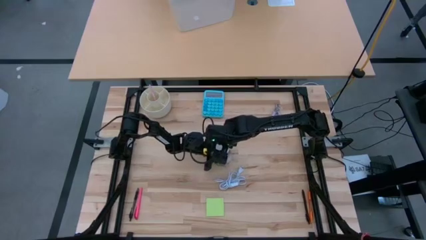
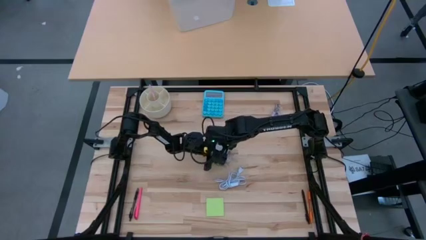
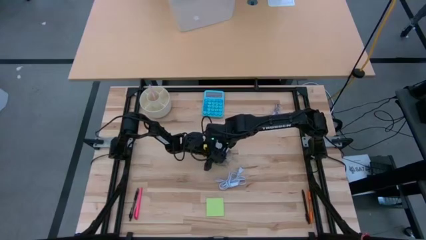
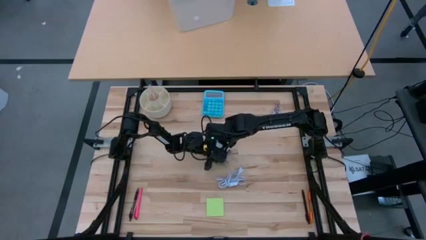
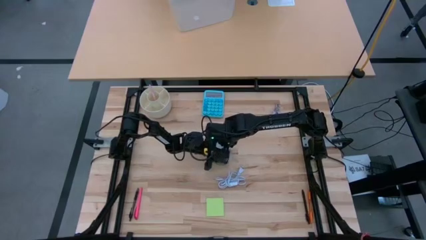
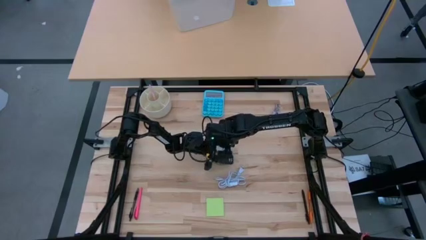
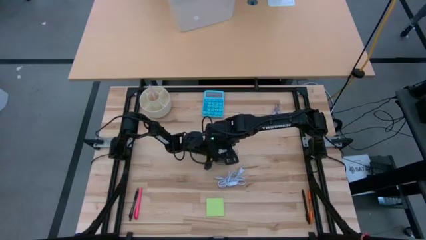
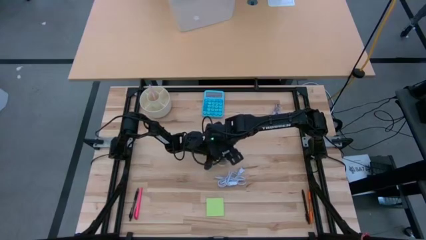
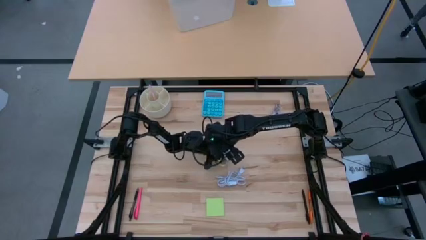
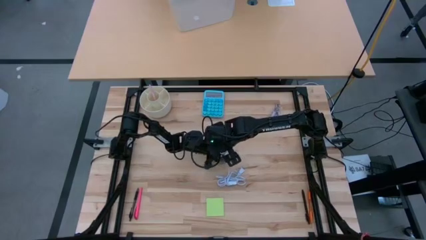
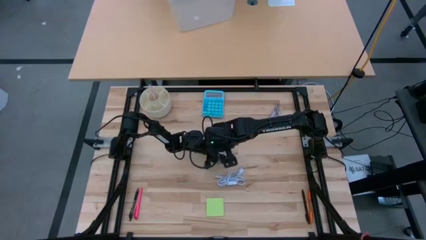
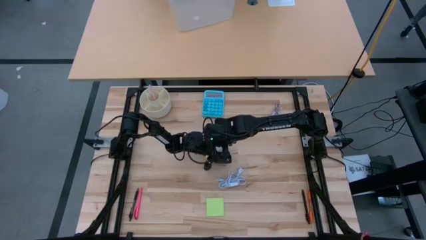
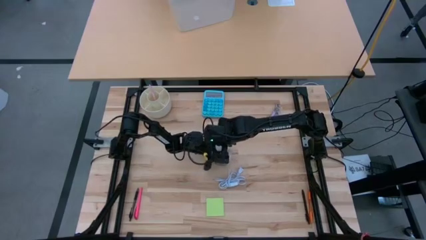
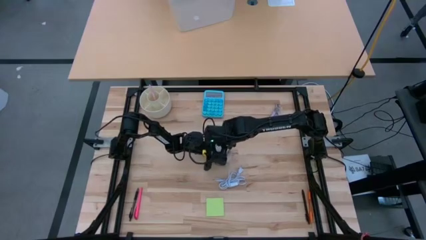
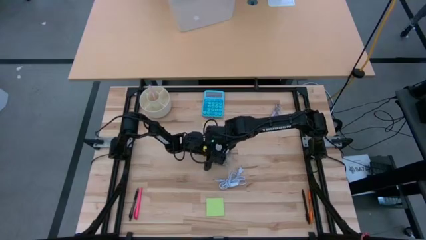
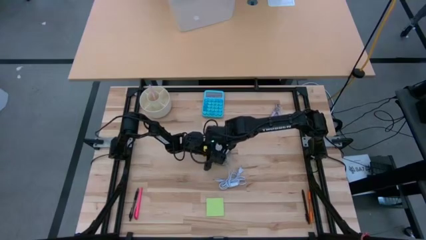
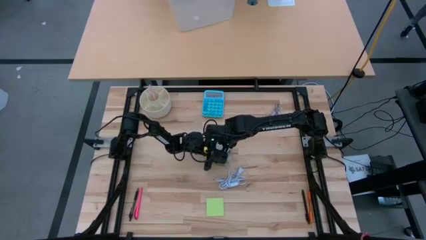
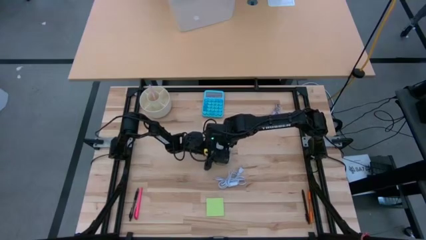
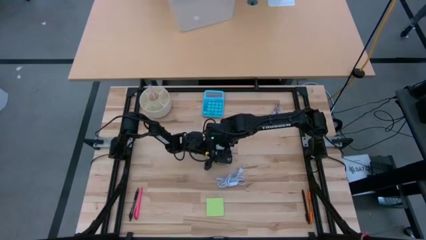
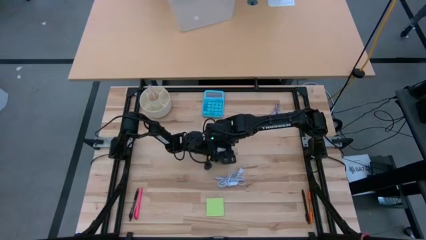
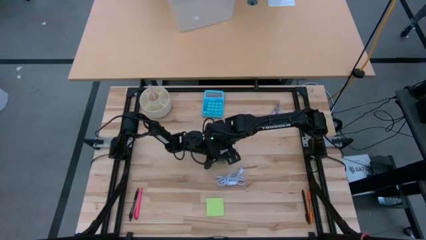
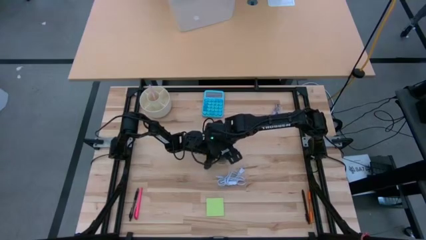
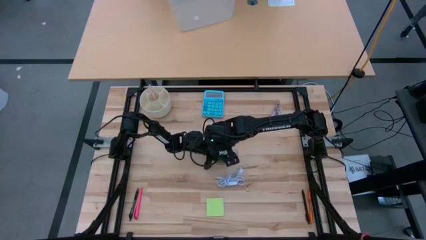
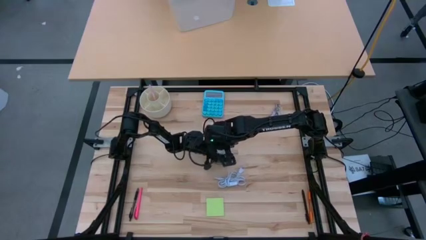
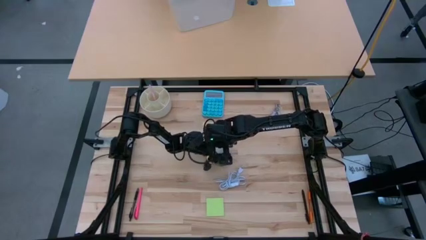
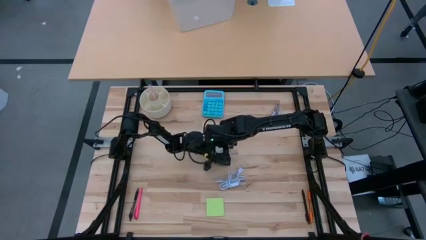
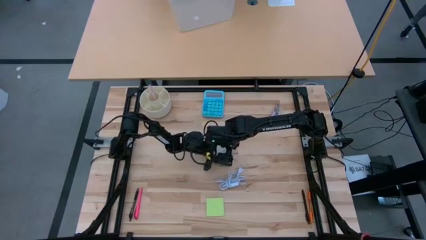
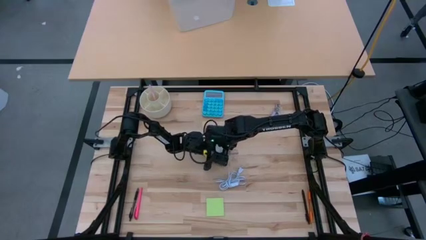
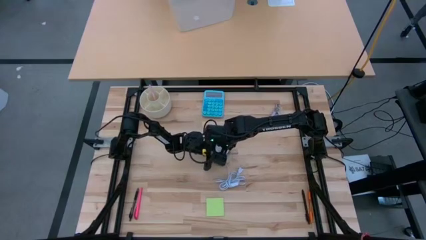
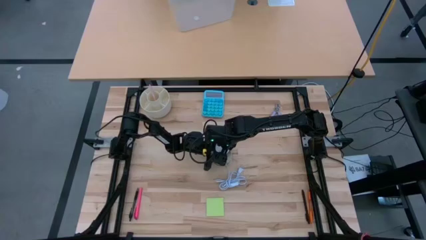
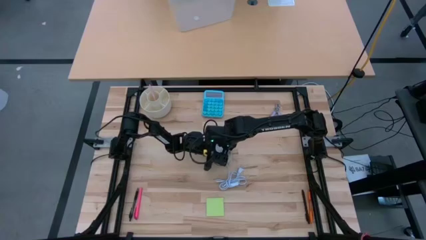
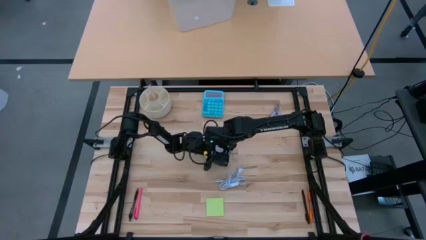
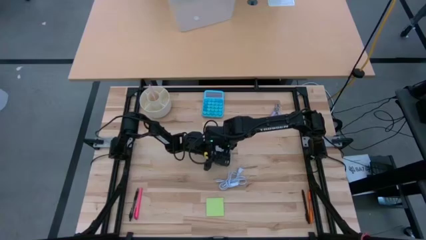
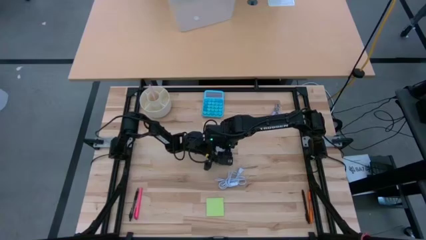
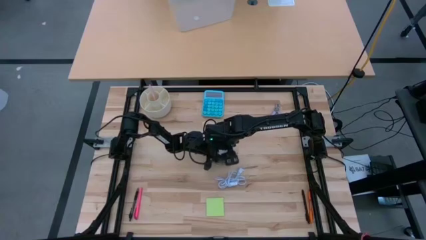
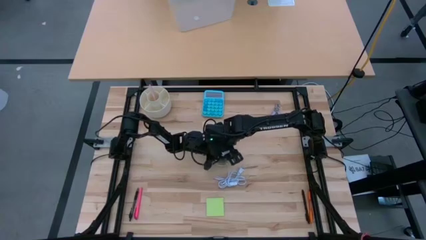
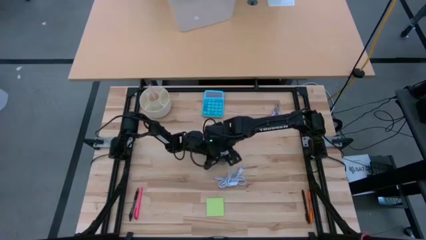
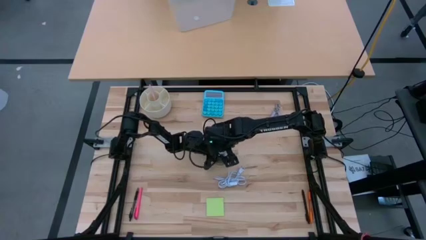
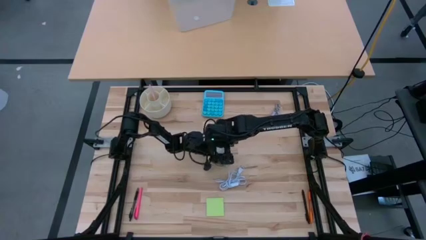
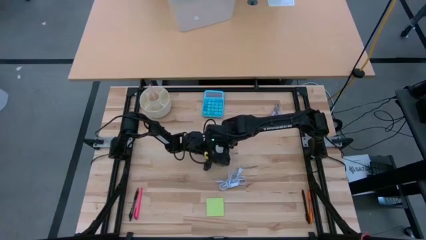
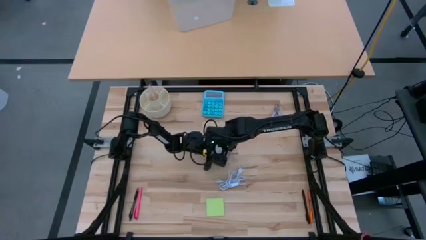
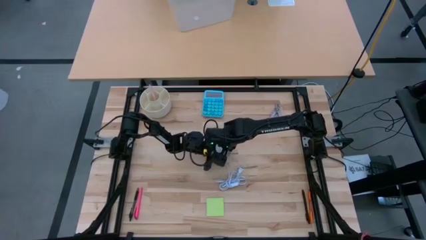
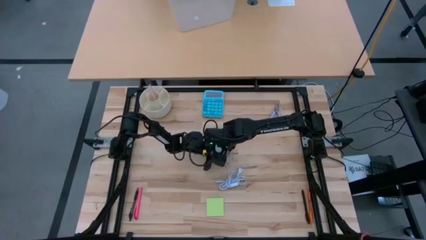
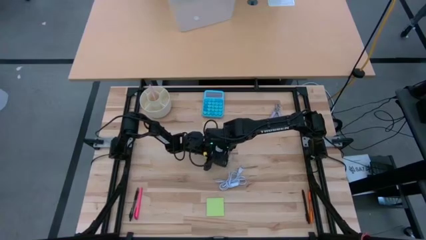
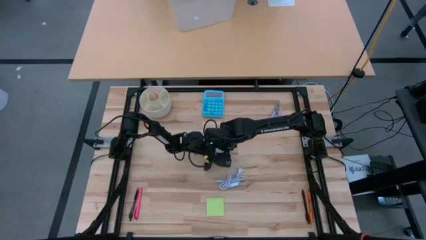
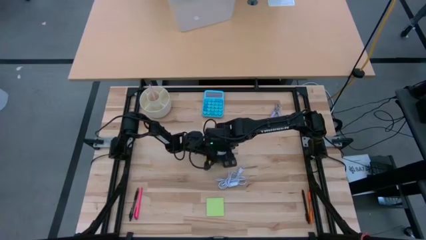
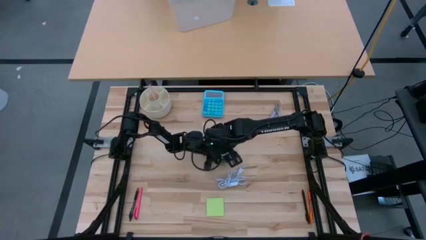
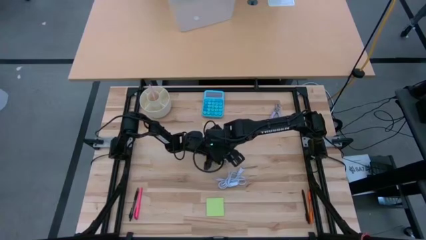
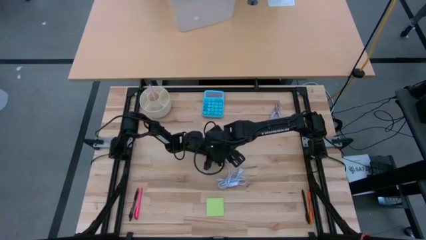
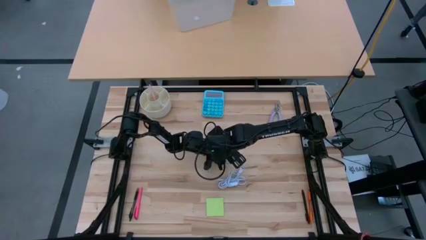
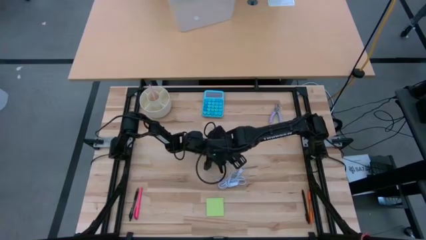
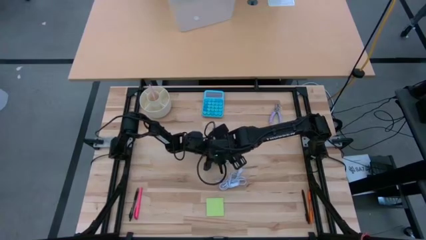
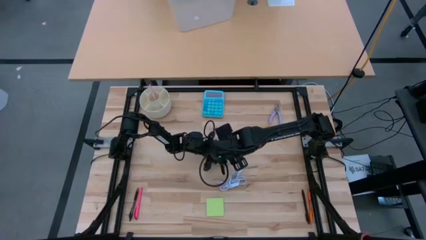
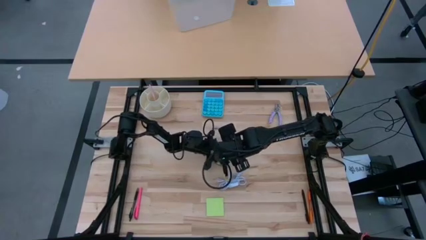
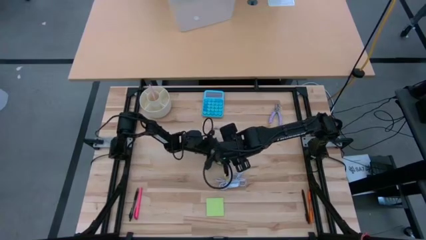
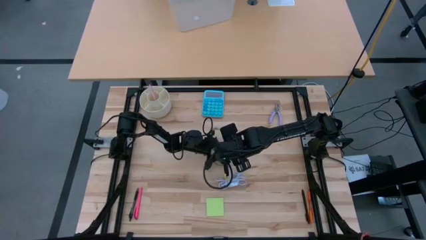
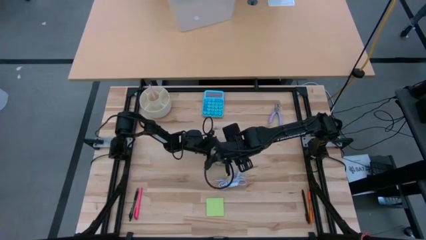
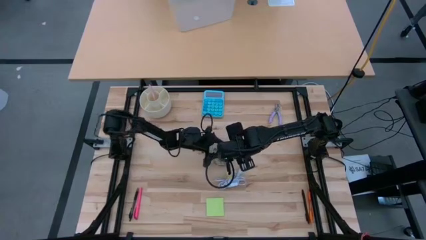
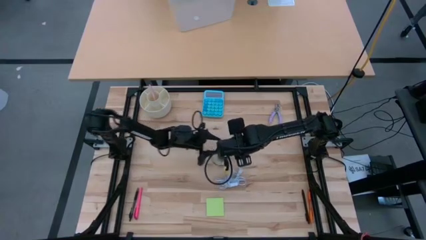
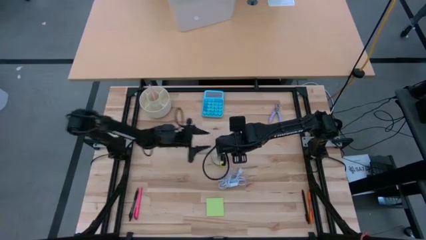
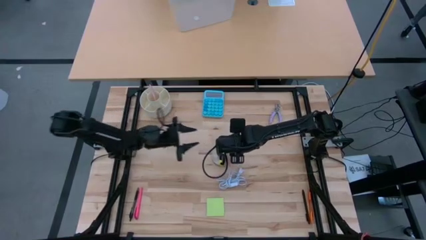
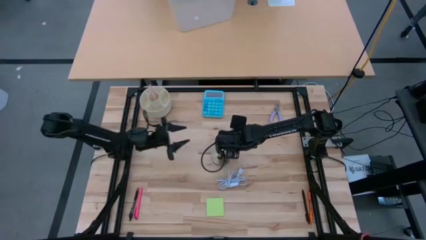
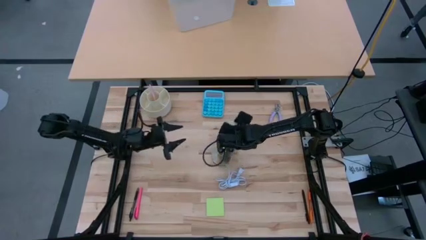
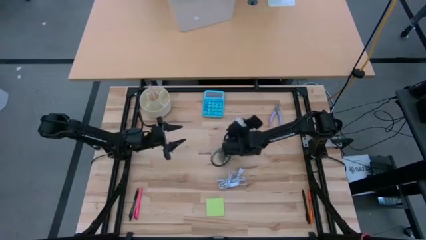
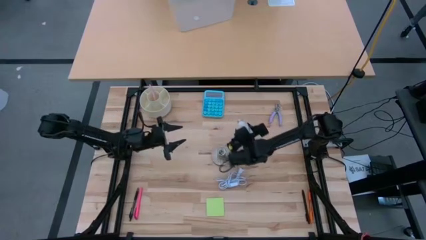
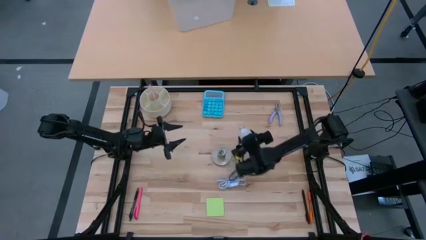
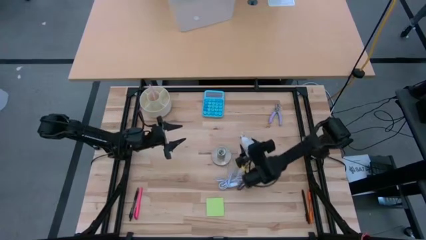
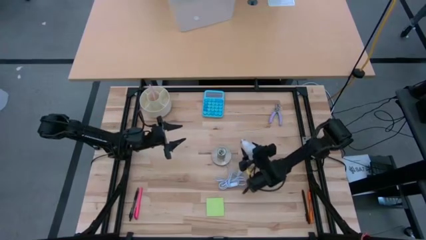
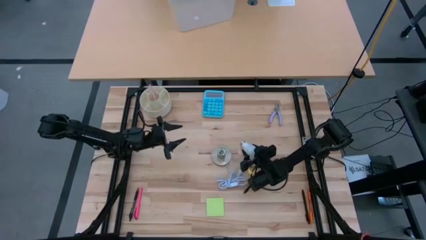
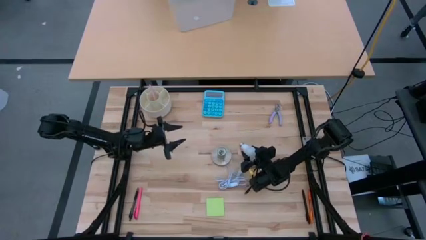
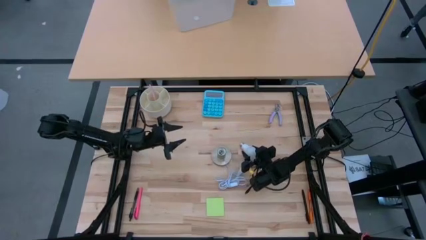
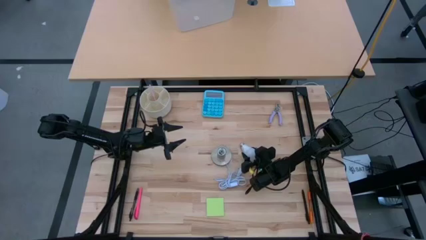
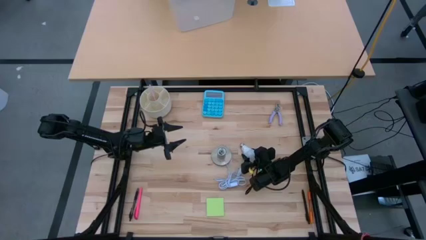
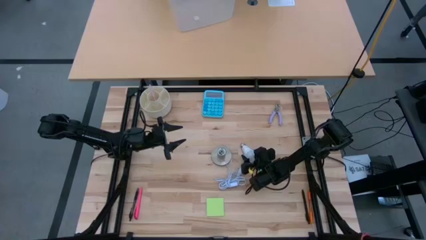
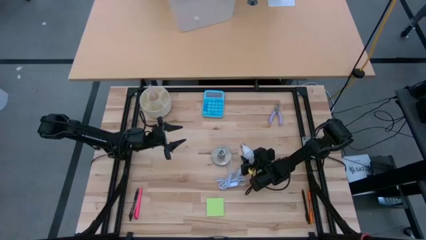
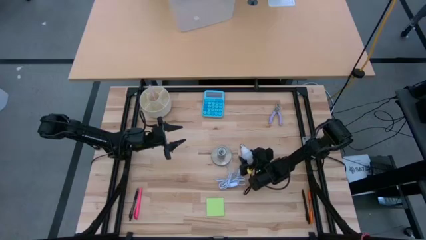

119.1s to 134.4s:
Task: Screw lightbulb
Remove the lightbulb from the lamp
